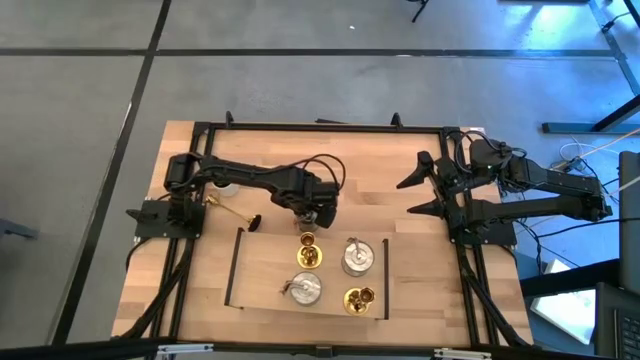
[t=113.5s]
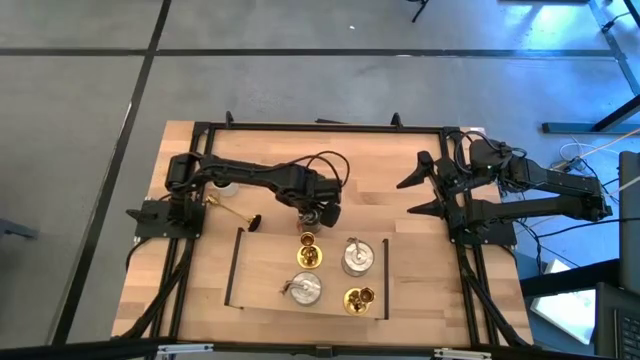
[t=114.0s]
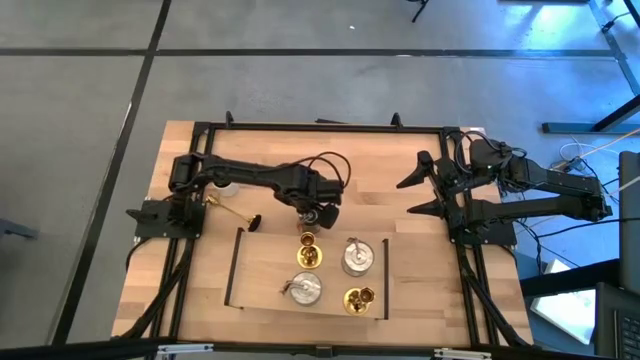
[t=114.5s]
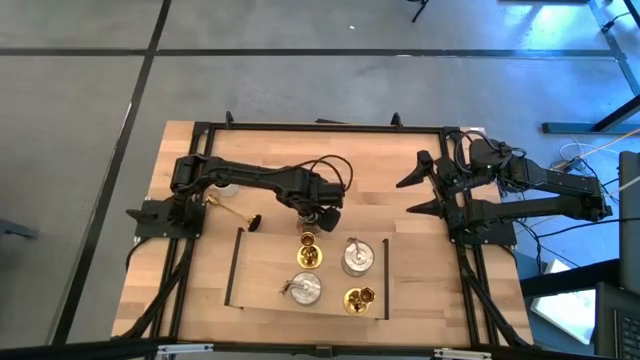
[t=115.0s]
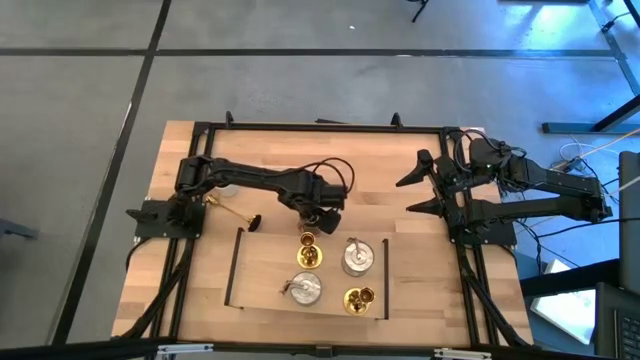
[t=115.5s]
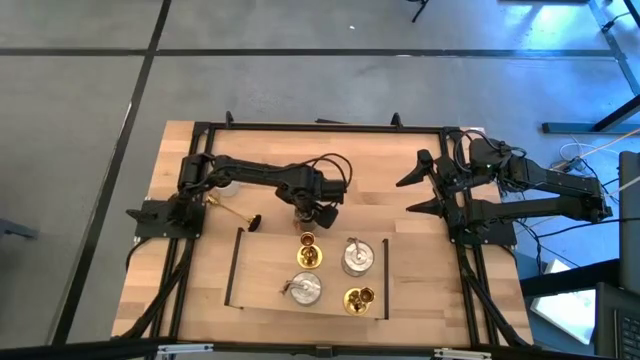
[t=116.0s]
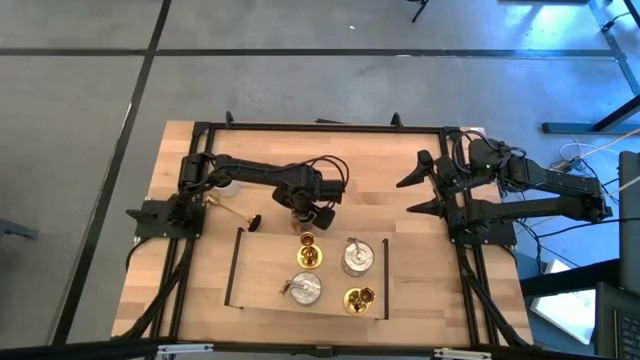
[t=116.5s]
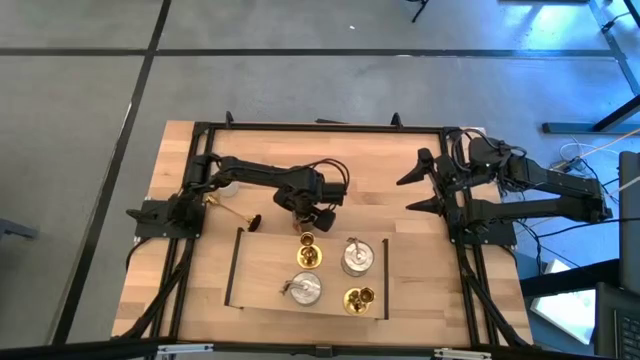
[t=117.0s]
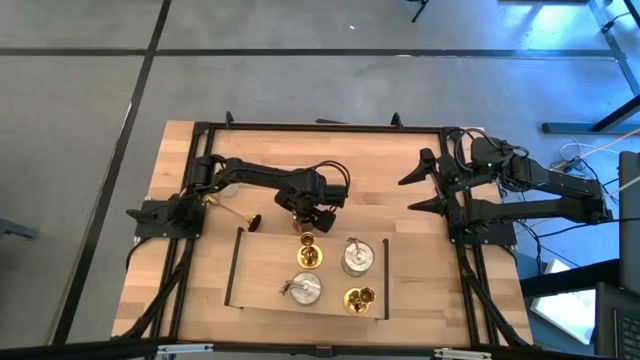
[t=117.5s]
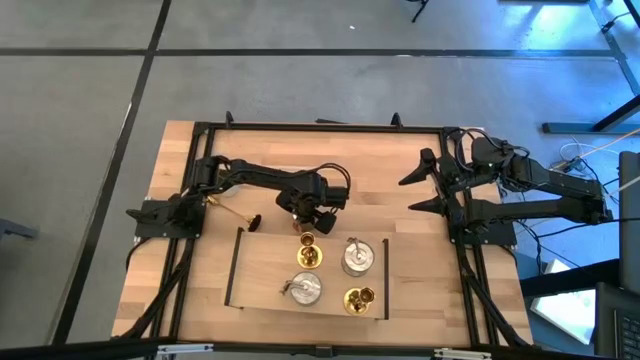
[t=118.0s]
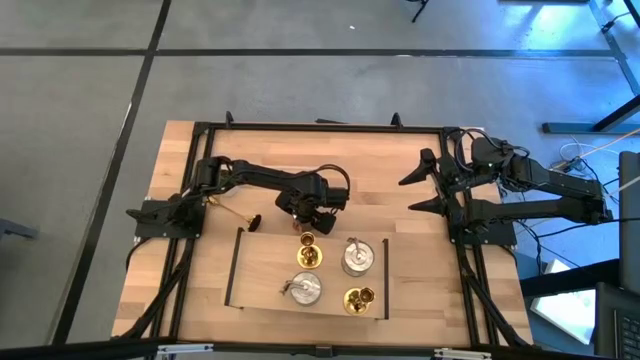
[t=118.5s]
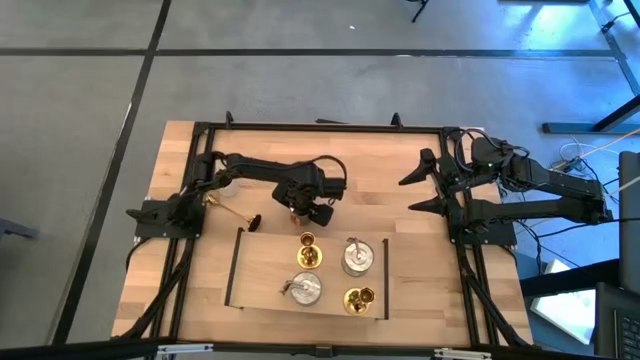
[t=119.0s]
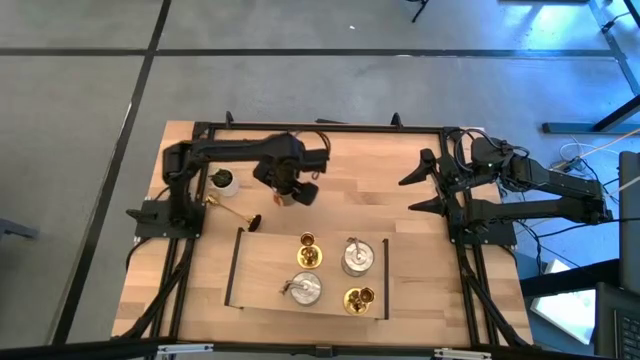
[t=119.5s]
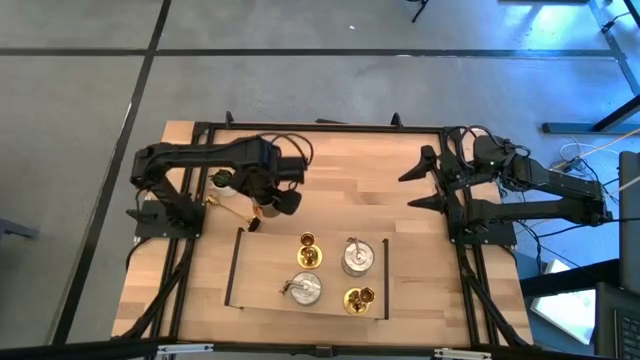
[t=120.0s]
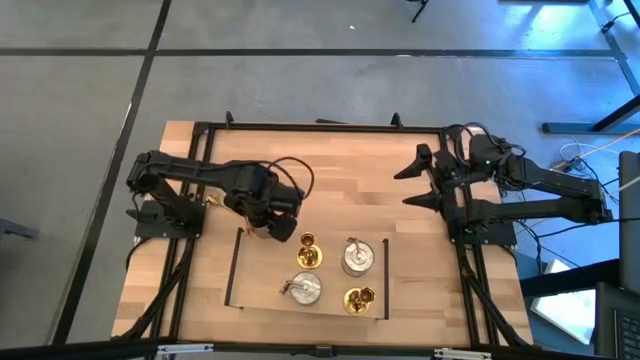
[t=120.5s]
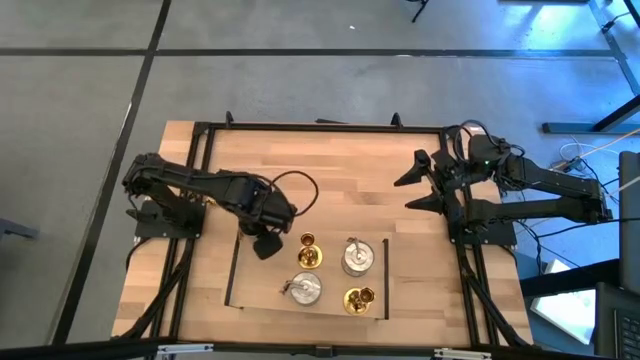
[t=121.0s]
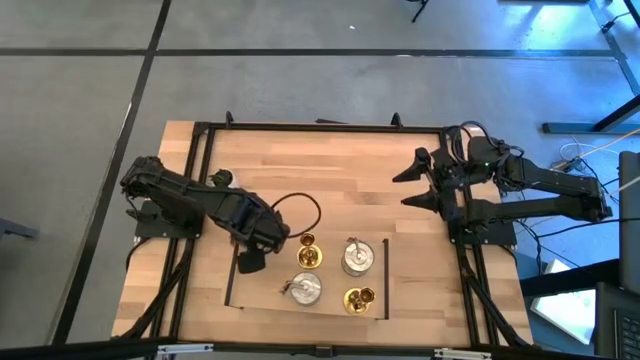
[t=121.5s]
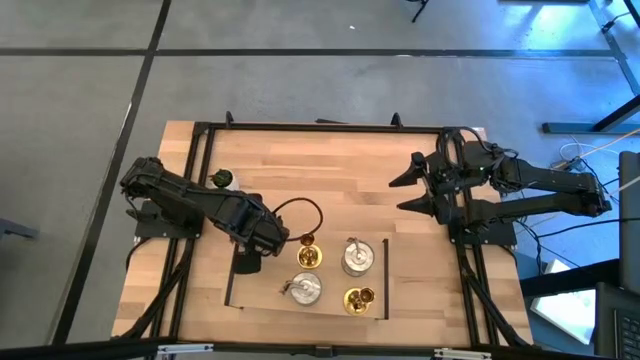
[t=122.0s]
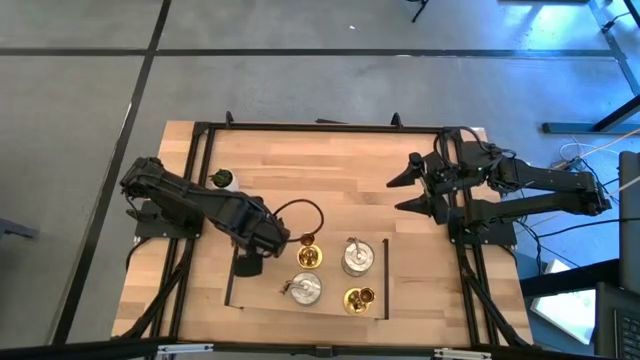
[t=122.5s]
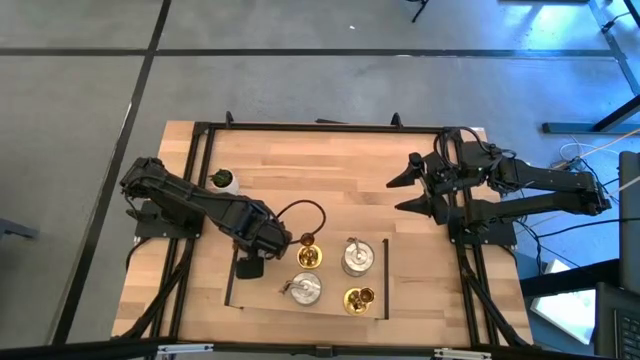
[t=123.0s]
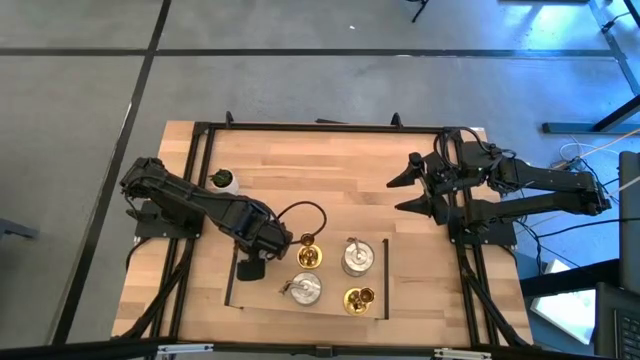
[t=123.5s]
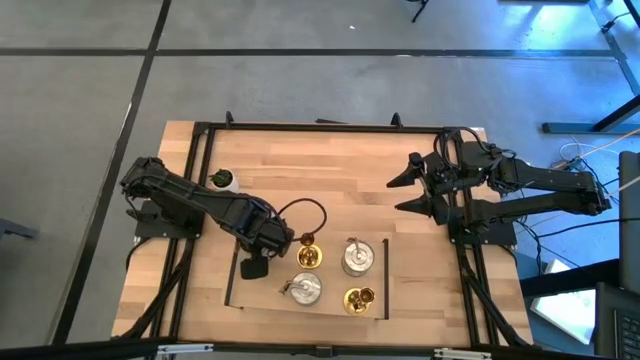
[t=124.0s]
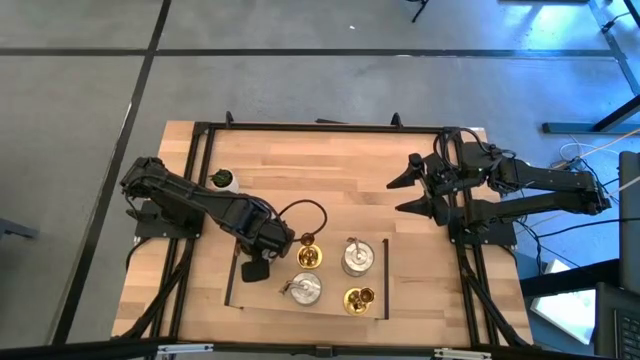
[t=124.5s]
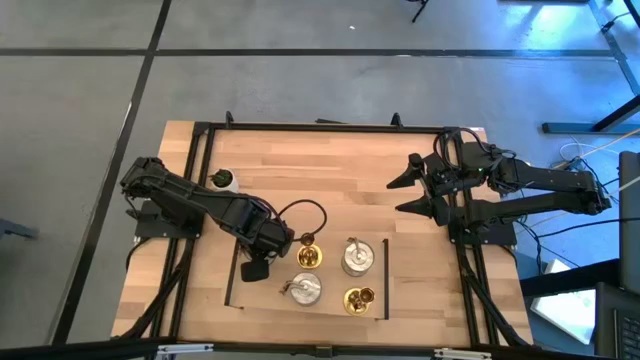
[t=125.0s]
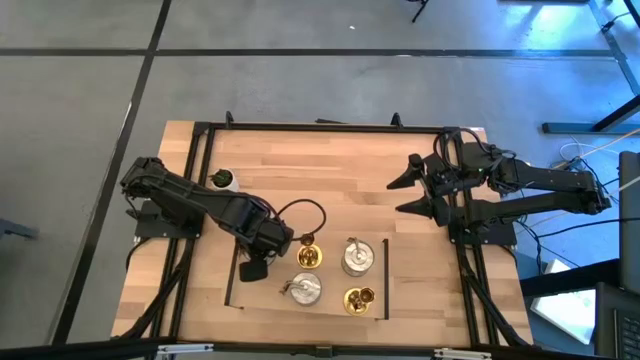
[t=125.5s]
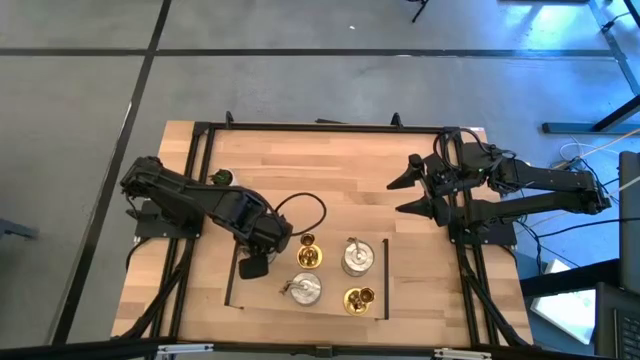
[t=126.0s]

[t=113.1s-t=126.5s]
Task: Pick & Place candle stick holders
Put the silver scented candle on the shelf

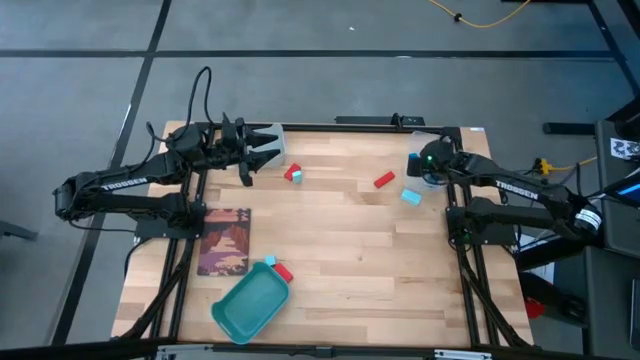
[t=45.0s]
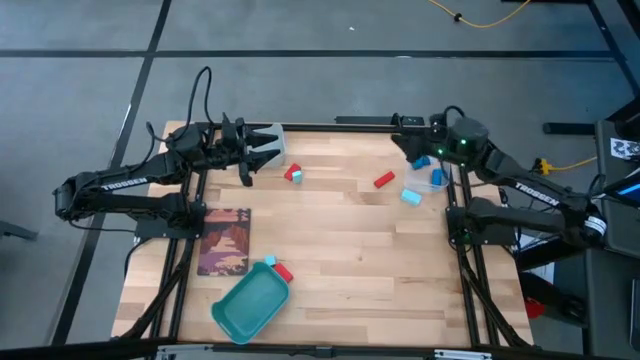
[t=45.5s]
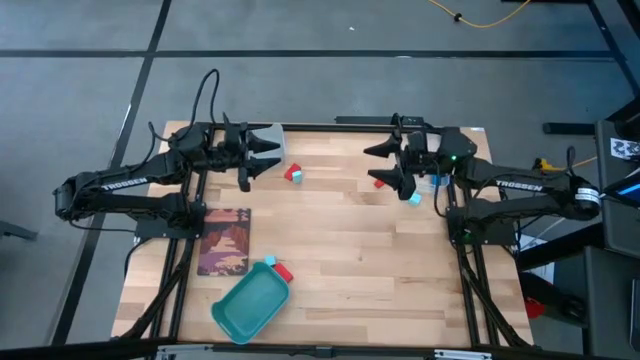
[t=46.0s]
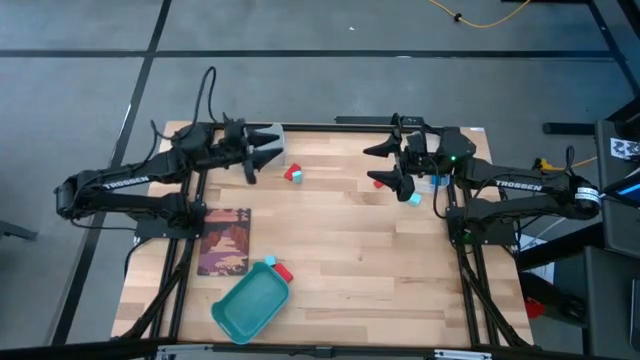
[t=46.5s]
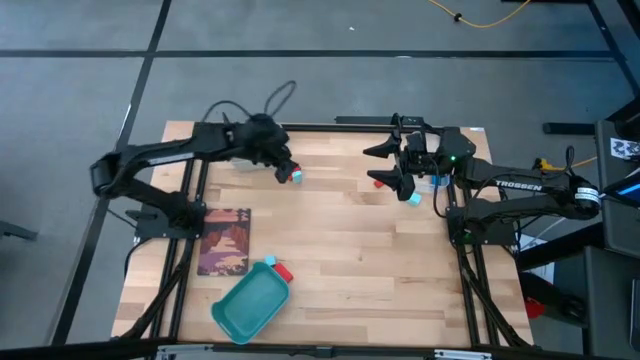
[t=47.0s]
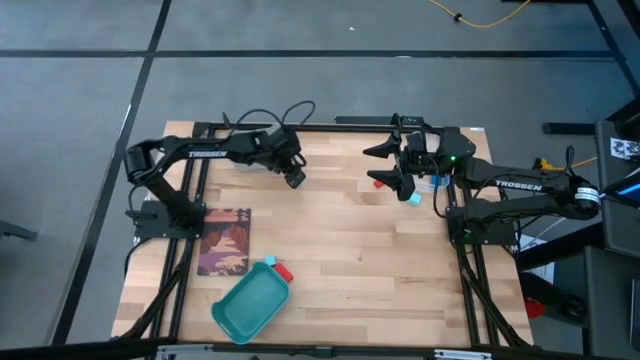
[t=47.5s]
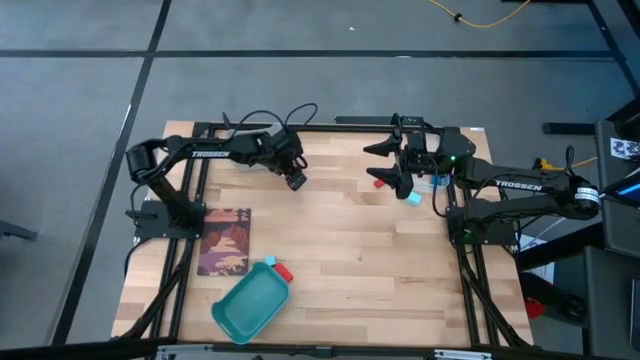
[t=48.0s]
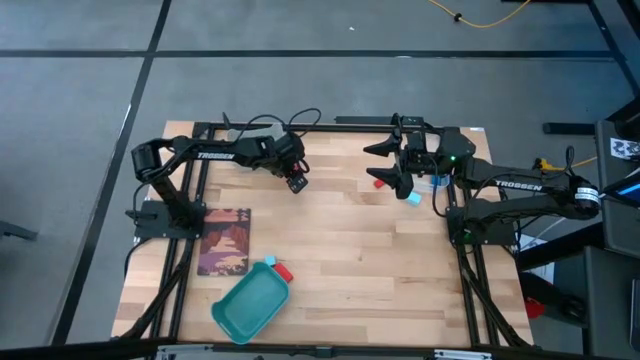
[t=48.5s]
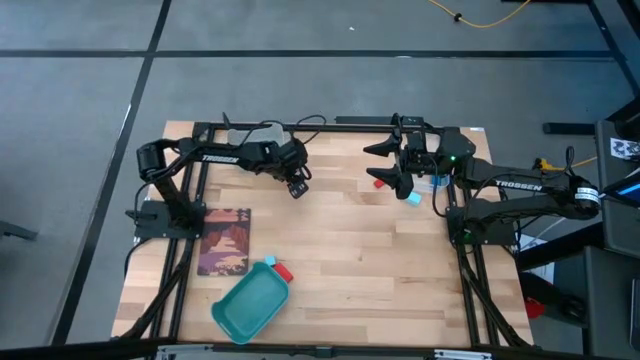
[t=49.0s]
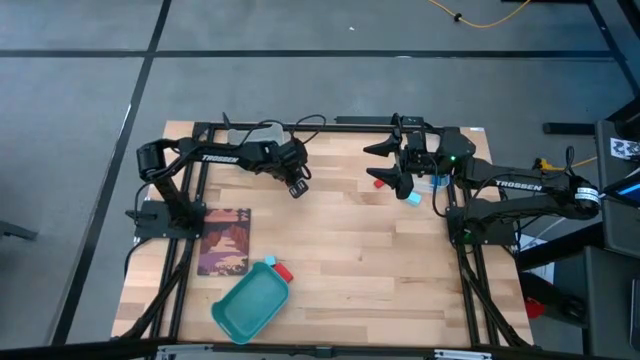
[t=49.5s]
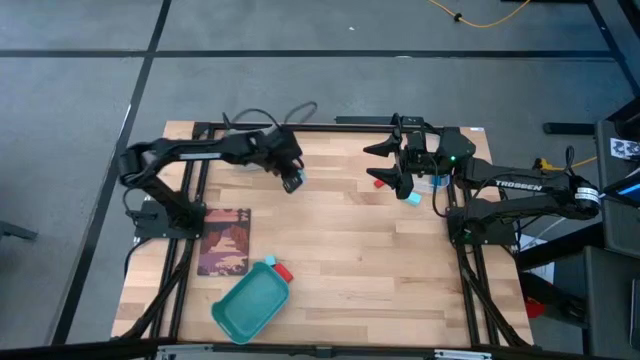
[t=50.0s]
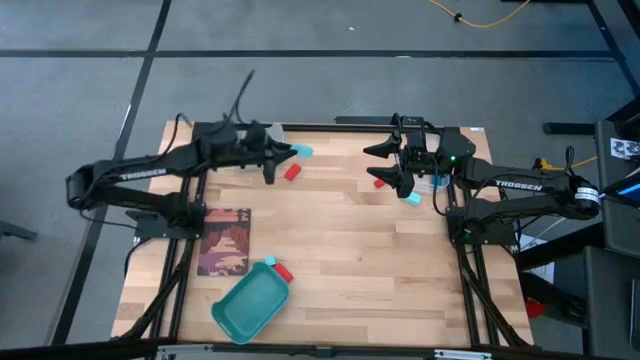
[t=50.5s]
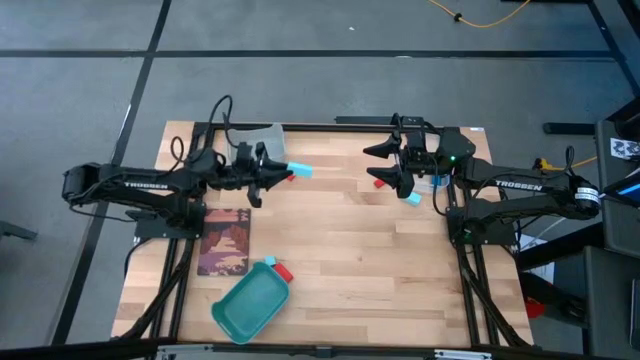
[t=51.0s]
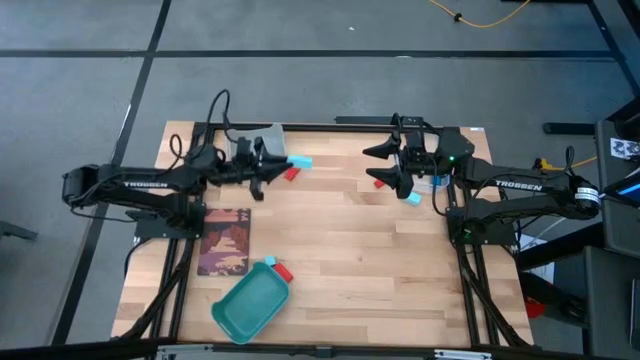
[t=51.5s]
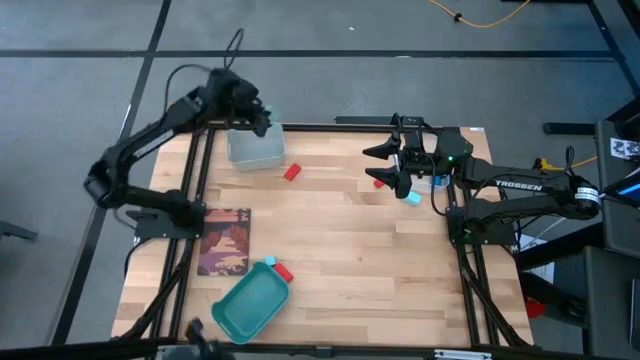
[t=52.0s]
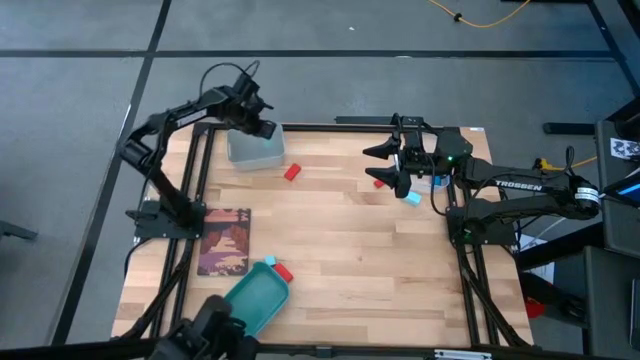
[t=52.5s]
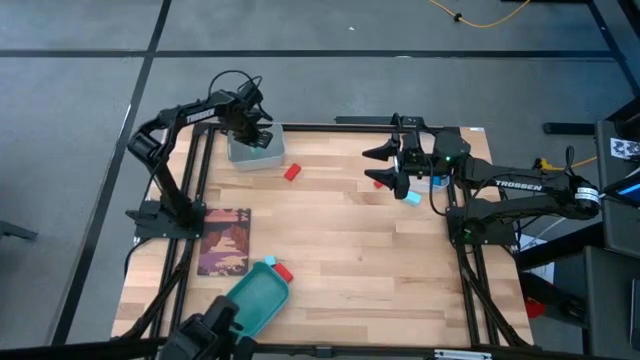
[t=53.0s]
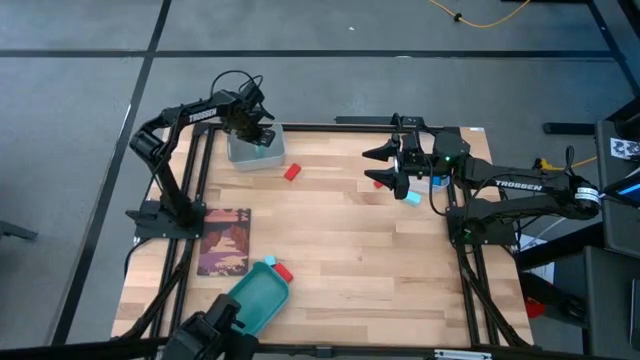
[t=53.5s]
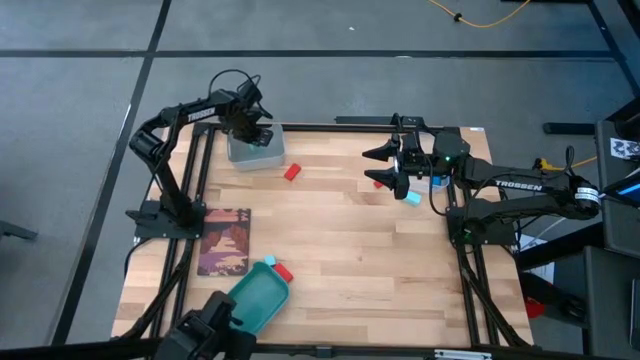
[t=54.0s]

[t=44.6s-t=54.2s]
Task: Sort & place blocks by color
Put the top left light blue block into the gray bin
